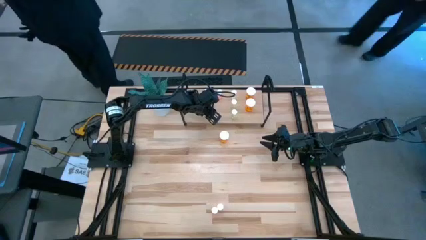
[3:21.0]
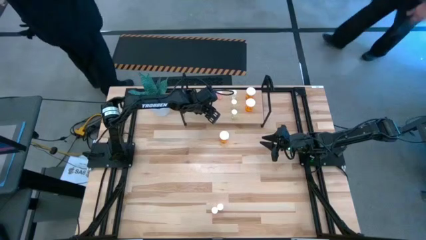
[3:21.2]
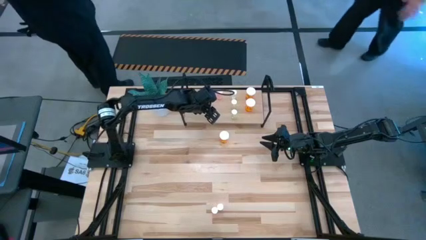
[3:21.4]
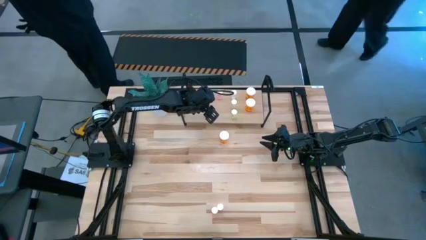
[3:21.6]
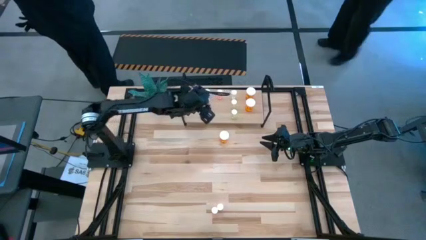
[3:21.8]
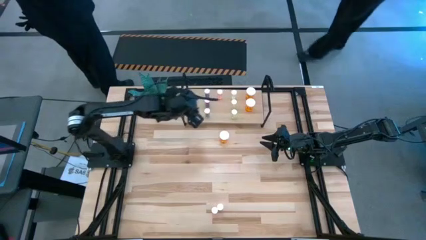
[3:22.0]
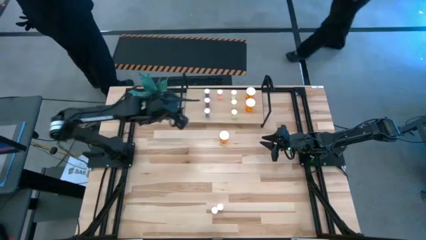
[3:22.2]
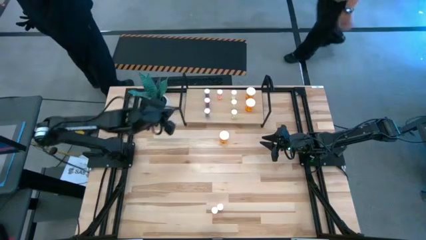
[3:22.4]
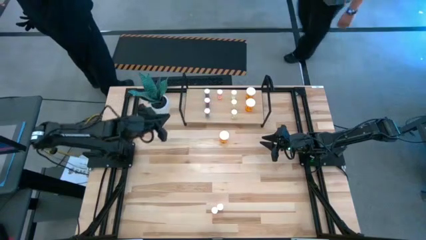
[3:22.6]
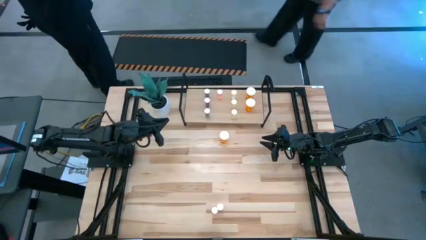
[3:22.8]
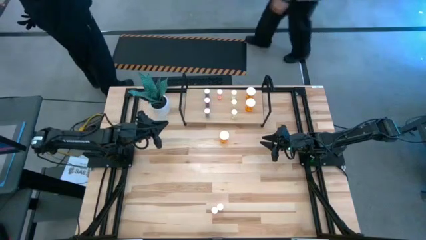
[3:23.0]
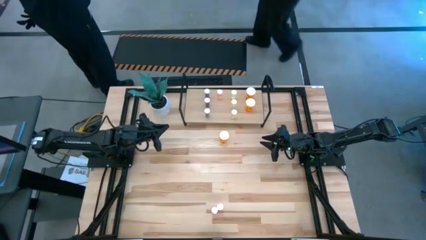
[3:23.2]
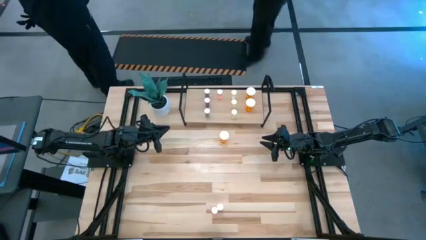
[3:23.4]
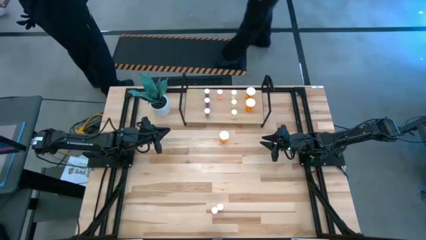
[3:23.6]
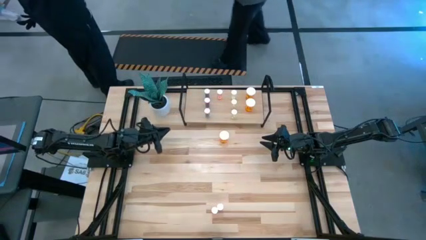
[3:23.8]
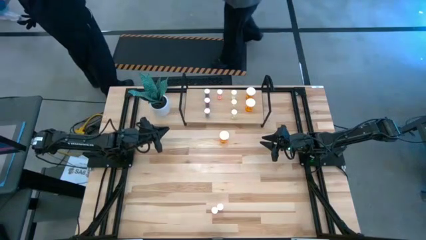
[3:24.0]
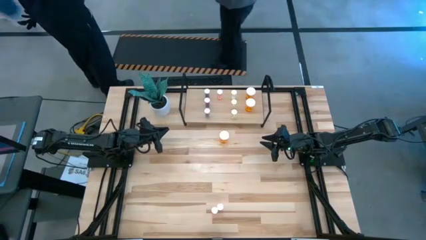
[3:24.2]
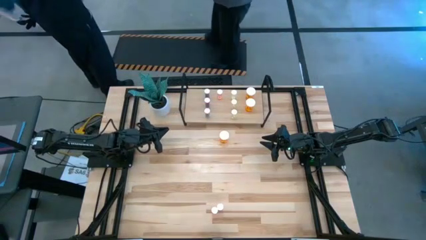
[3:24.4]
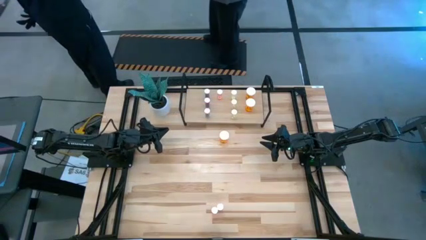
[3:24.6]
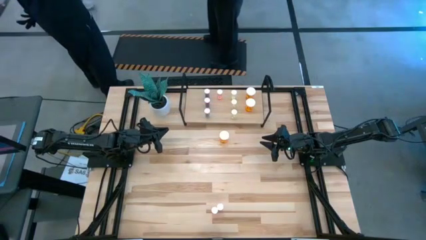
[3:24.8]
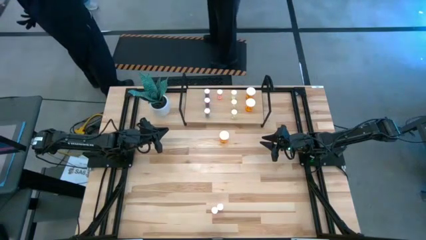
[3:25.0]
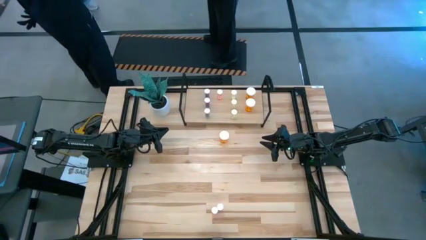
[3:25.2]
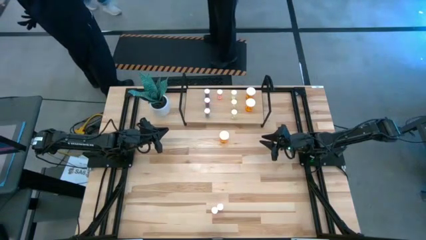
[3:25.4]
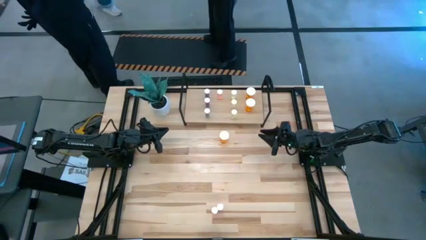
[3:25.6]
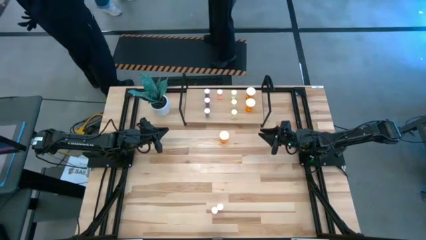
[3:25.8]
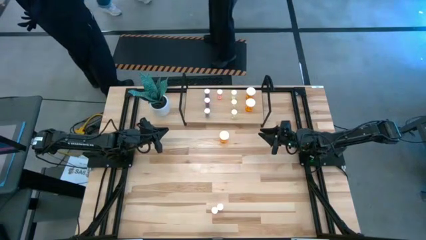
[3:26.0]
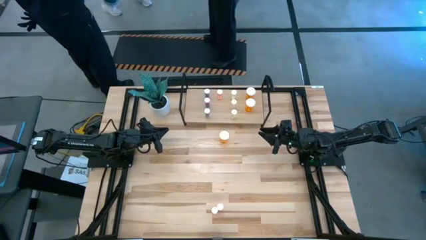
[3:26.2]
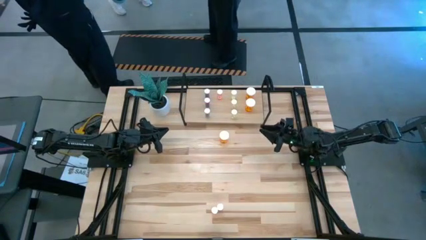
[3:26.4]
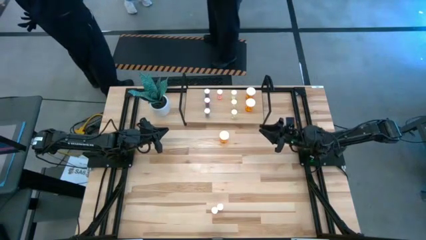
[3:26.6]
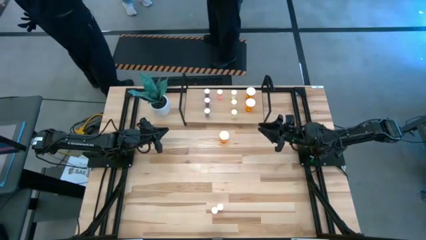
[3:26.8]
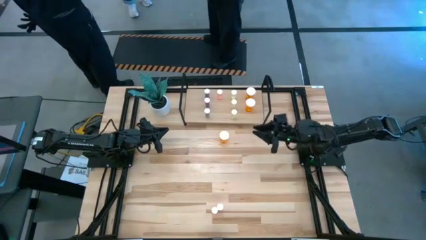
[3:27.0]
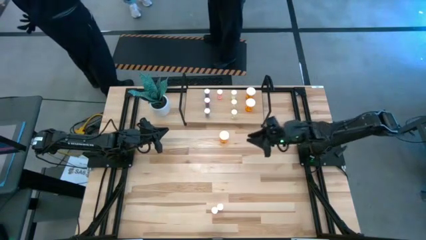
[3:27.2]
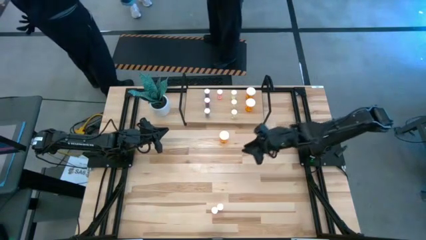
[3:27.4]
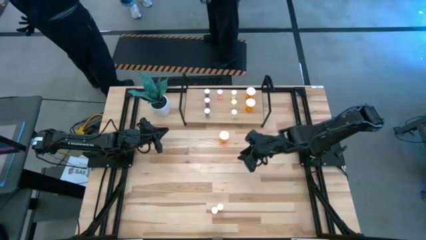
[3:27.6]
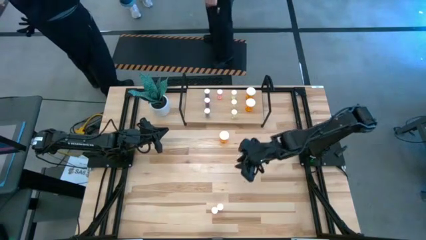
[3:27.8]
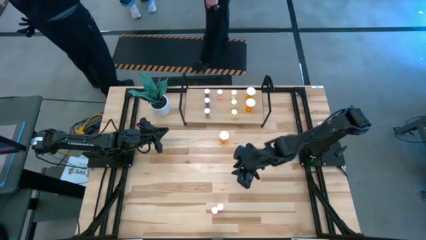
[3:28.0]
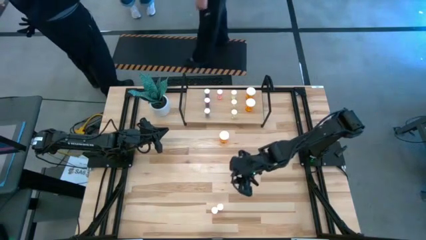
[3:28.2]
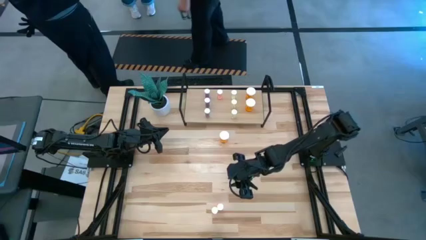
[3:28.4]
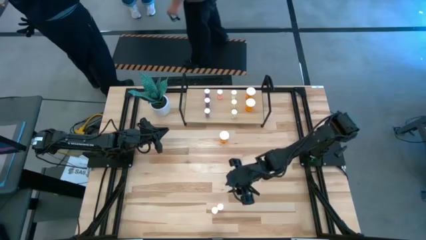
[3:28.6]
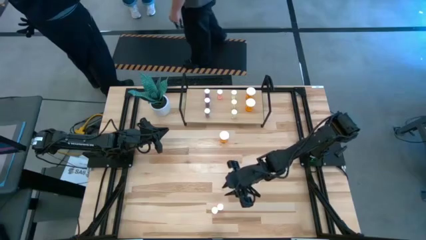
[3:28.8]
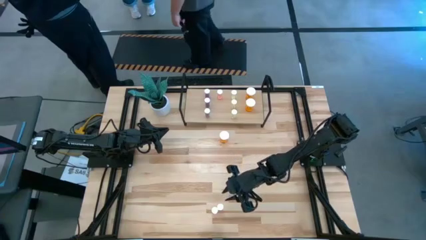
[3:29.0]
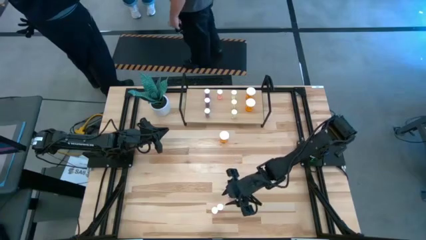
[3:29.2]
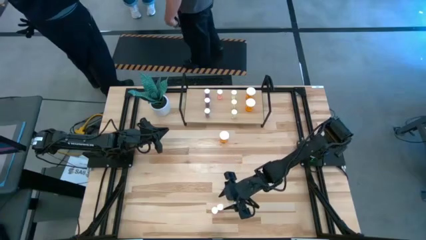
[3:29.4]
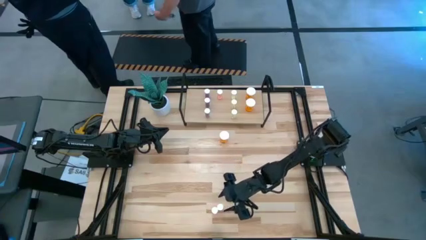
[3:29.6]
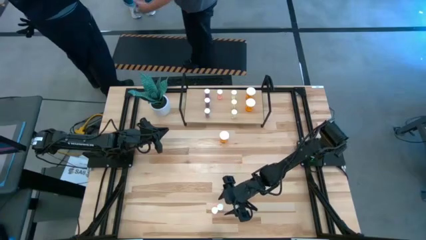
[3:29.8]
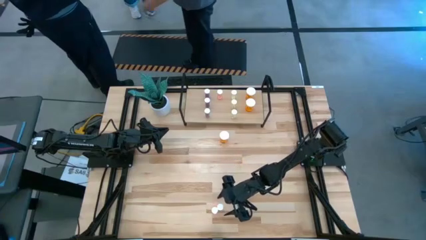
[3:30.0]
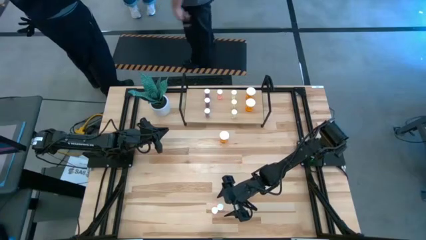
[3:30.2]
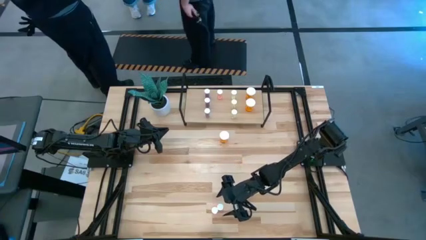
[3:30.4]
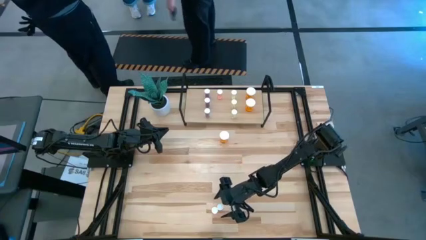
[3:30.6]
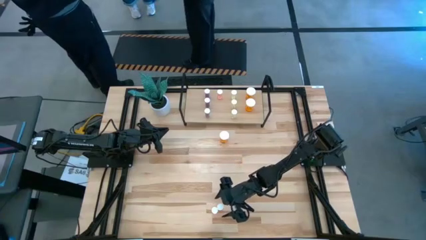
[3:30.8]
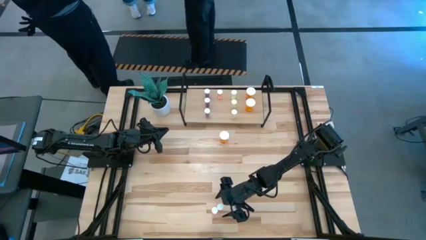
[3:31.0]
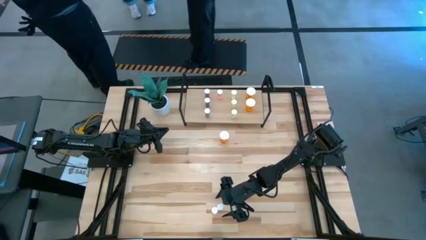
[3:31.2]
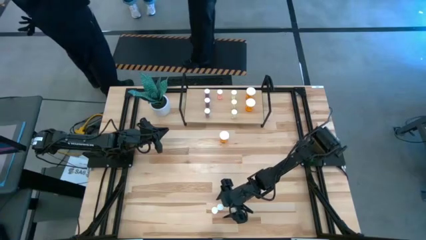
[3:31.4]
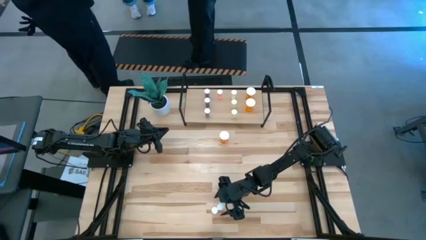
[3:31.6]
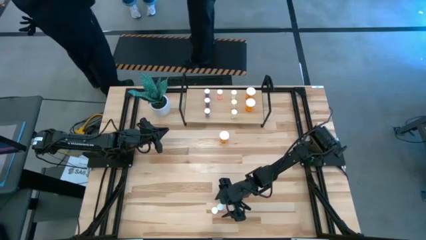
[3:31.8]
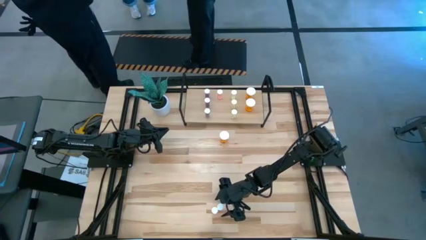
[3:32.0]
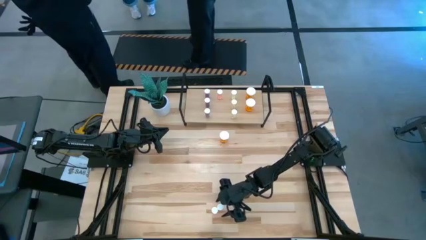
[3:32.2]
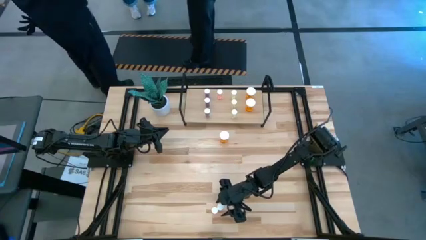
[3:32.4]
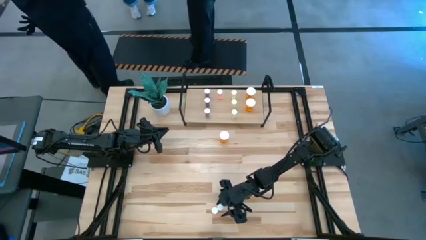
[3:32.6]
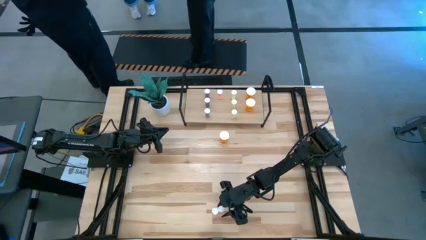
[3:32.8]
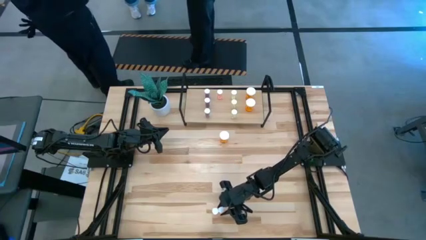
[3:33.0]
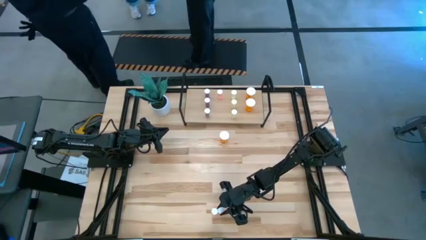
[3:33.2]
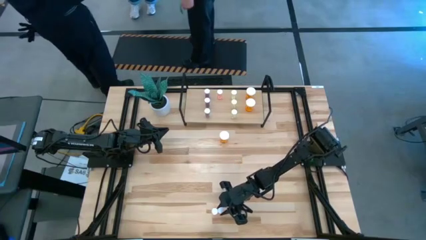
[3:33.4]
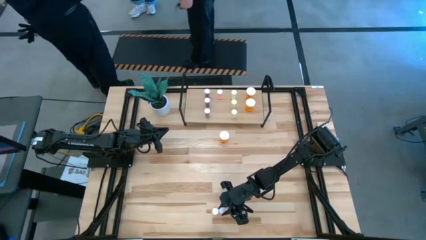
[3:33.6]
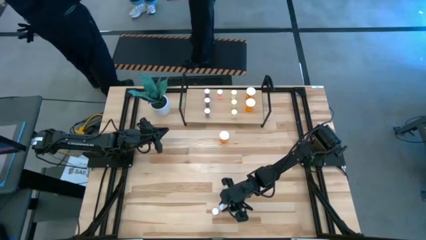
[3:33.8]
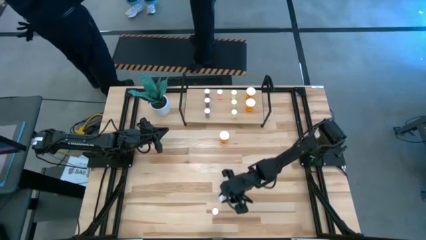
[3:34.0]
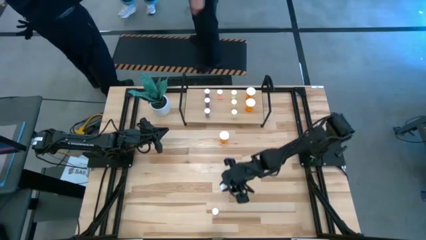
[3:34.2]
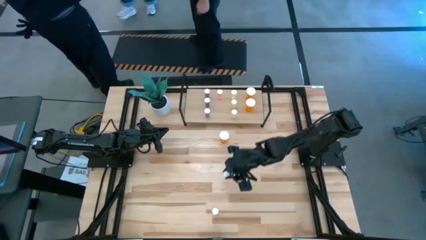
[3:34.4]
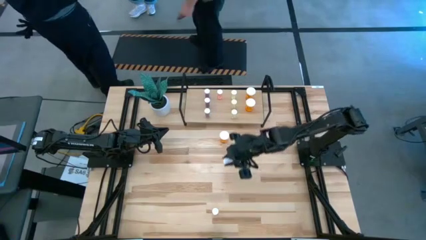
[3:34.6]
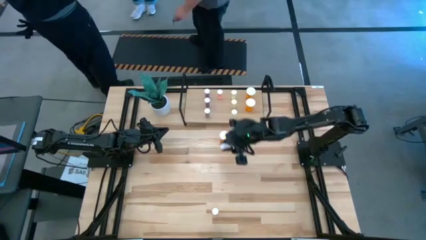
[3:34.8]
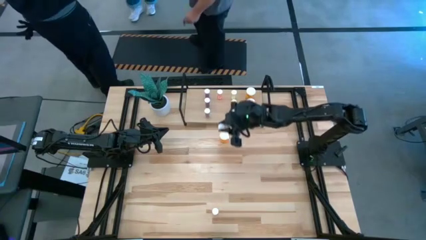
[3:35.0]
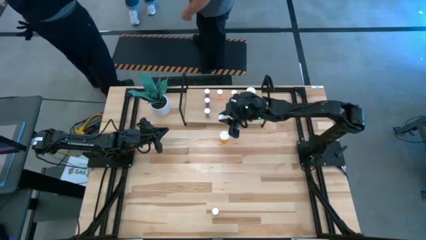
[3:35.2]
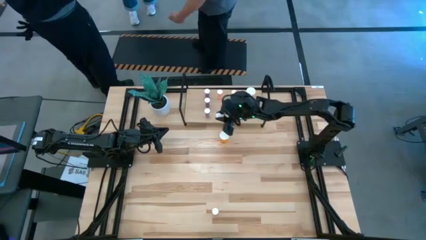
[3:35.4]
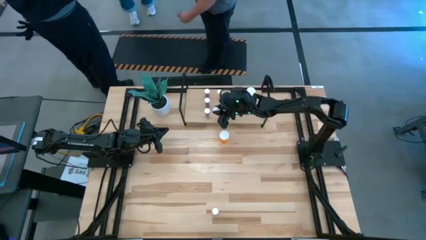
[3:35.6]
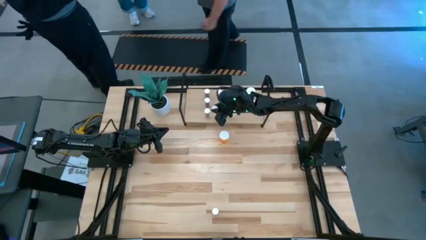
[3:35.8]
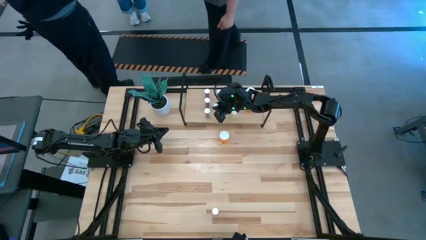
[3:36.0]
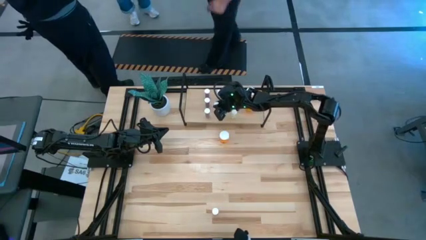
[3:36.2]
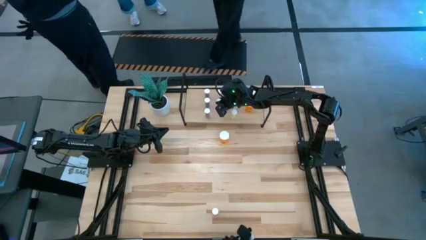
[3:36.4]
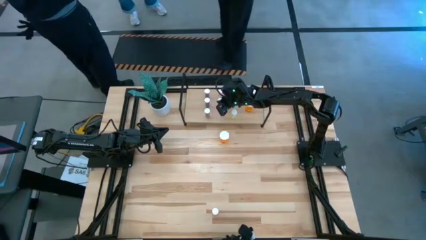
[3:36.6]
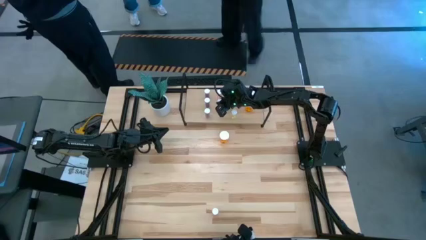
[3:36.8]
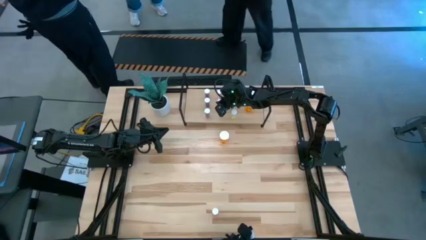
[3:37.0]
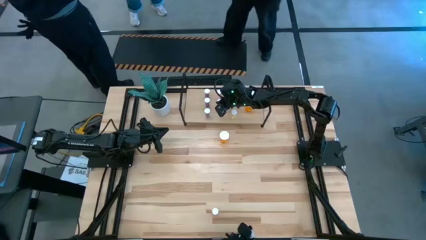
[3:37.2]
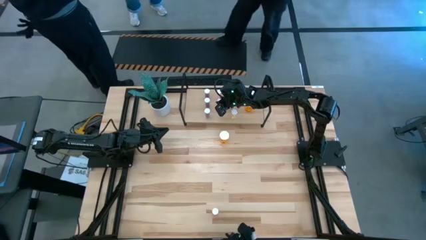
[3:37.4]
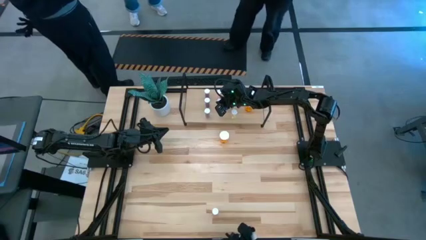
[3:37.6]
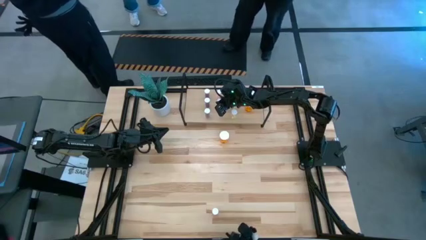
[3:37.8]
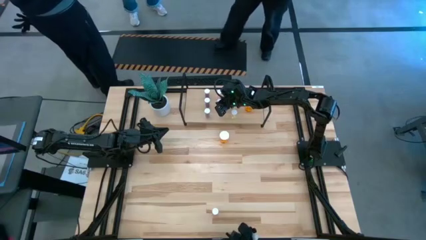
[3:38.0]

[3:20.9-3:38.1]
Task: Pick and place medicine bottles onto shelf by color
Put the red pill bottle on the shelf
